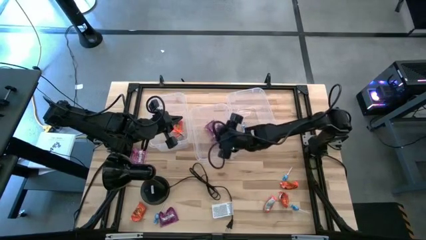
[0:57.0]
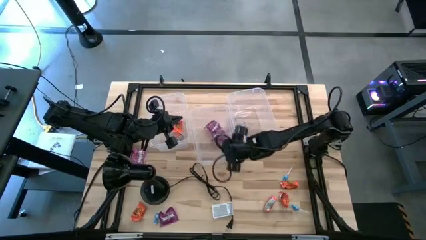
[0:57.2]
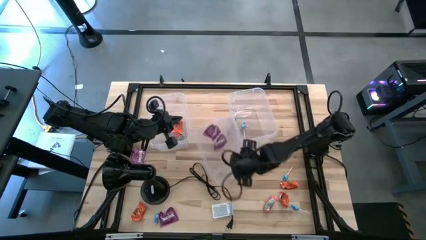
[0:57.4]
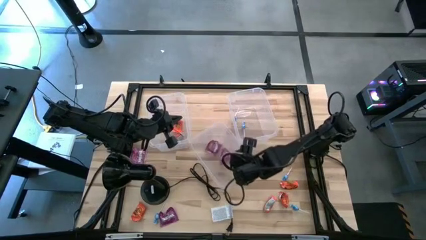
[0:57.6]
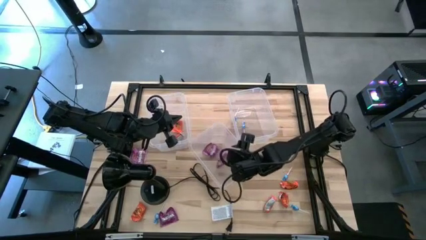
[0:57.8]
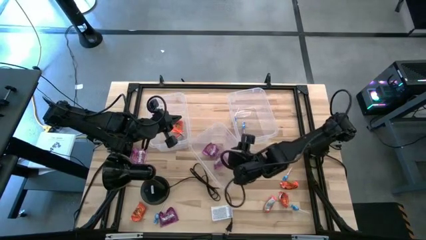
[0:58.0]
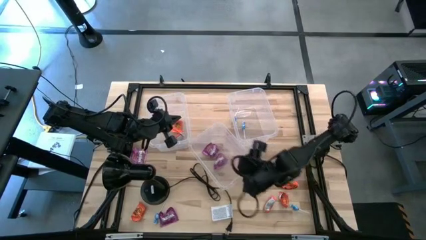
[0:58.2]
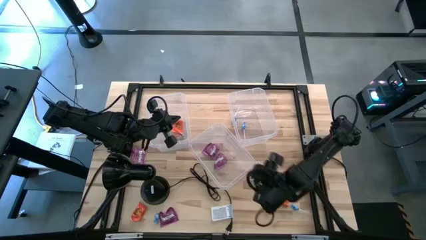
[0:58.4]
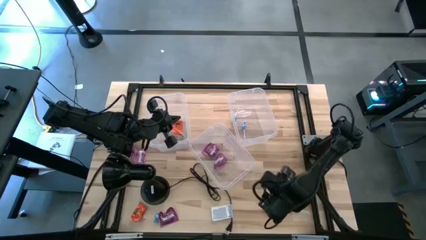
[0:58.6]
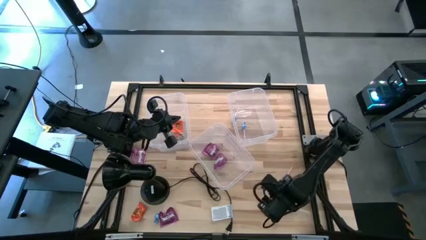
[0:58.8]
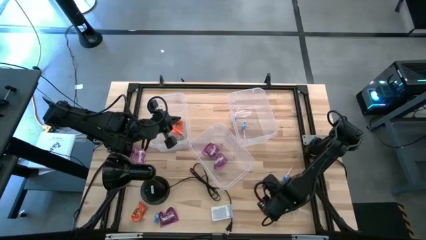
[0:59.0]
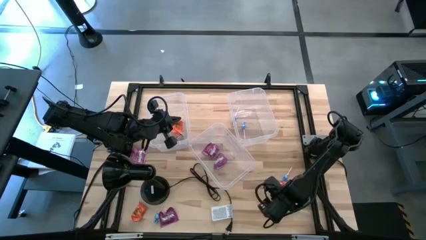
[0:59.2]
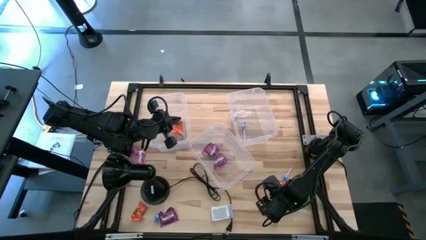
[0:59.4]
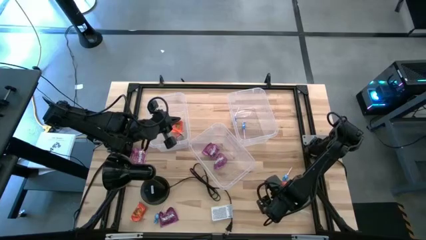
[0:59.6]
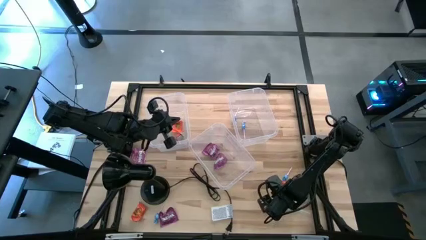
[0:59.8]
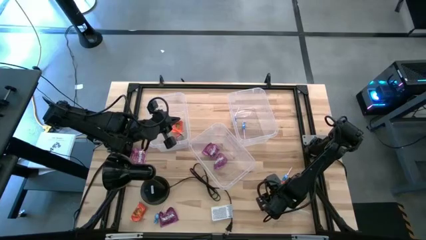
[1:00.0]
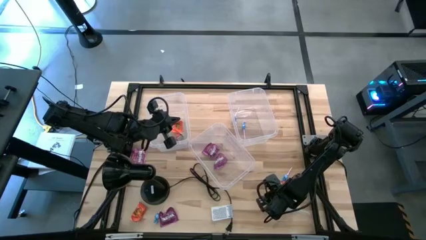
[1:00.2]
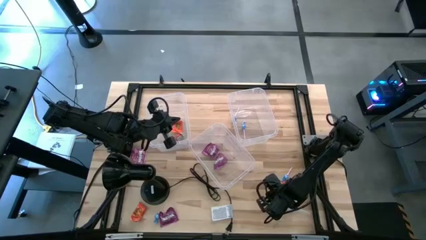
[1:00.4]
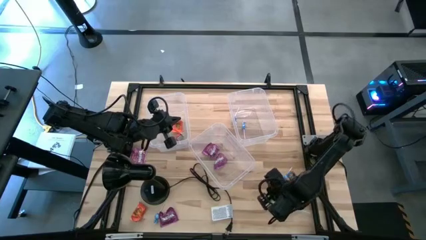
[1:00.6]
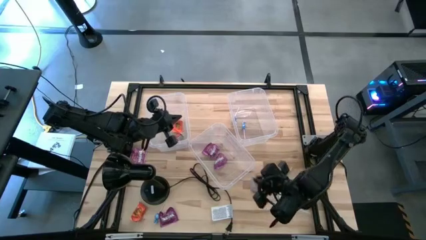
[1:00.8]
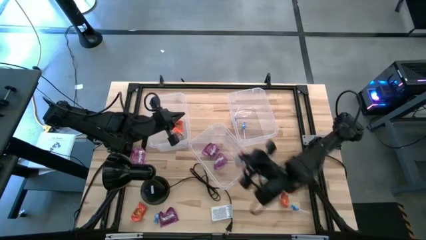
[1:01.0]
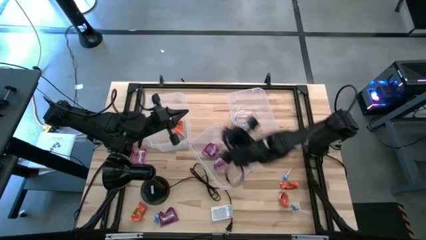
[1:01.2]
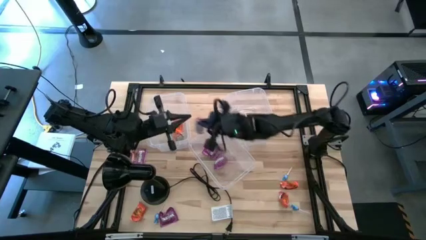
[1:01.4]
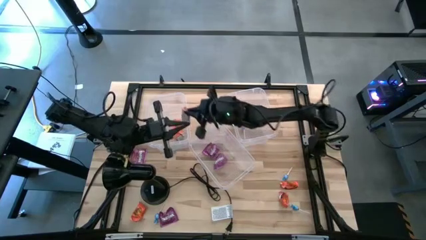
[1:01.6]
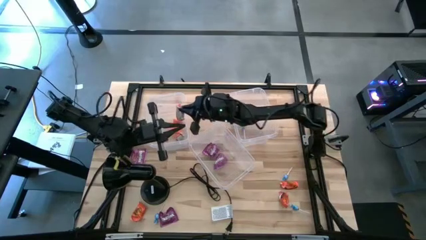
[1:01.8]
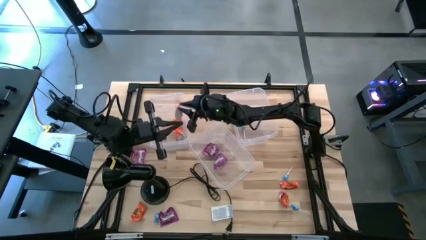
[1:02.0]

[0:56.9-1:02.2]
Task: Sort candy
Put the orange candy into the left transparent bin

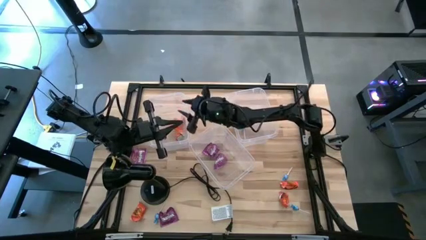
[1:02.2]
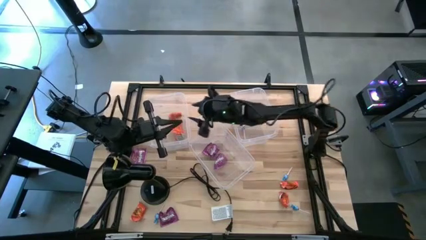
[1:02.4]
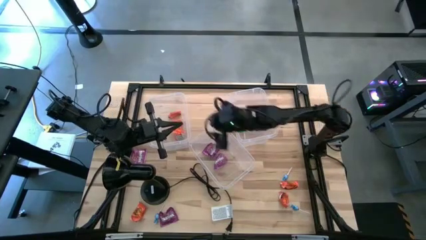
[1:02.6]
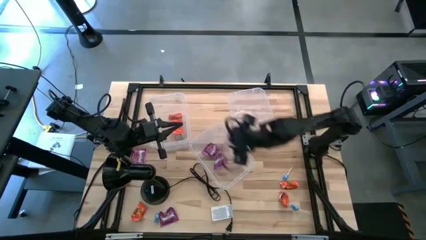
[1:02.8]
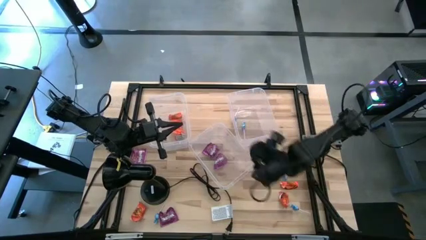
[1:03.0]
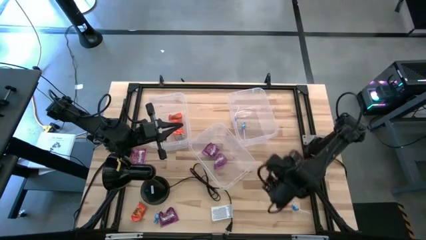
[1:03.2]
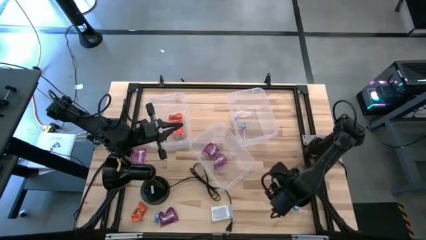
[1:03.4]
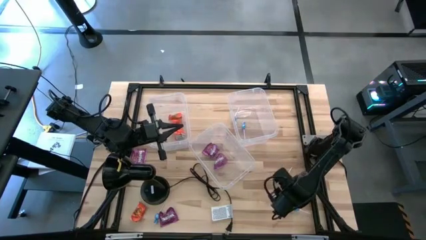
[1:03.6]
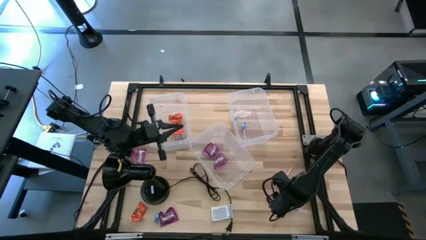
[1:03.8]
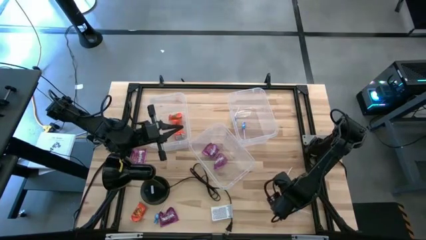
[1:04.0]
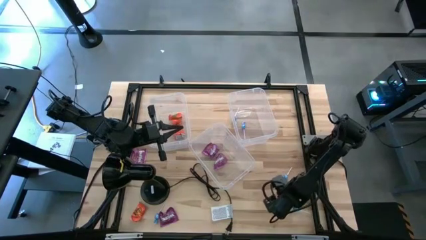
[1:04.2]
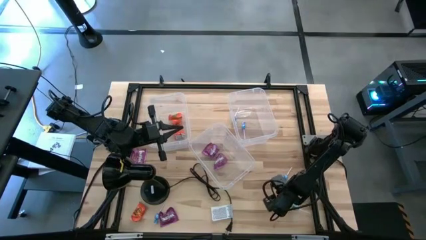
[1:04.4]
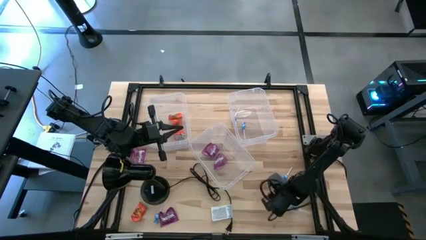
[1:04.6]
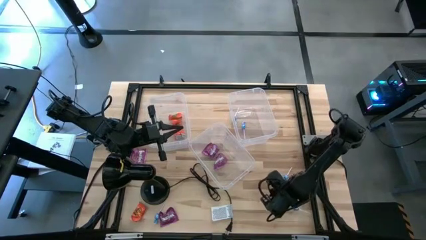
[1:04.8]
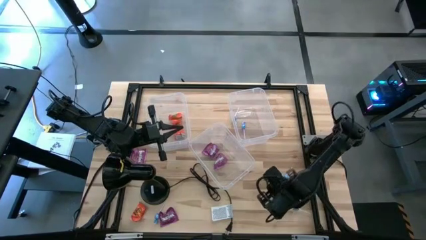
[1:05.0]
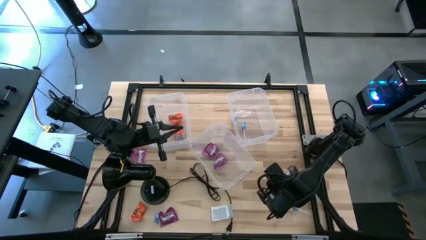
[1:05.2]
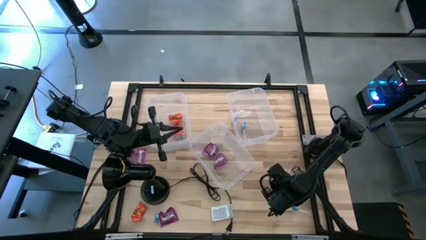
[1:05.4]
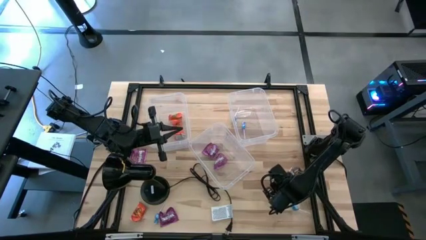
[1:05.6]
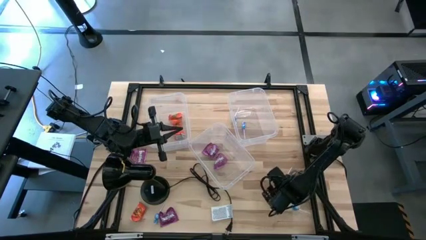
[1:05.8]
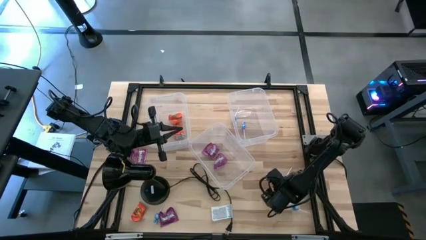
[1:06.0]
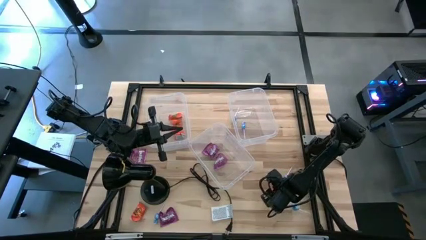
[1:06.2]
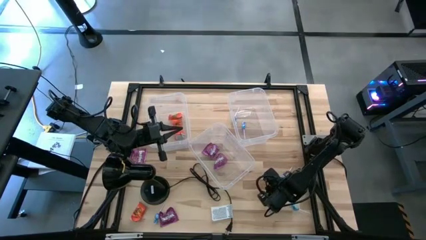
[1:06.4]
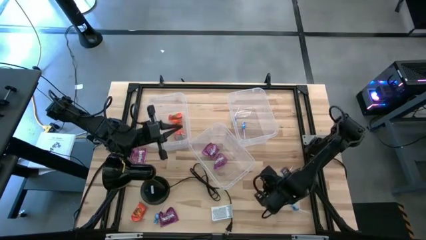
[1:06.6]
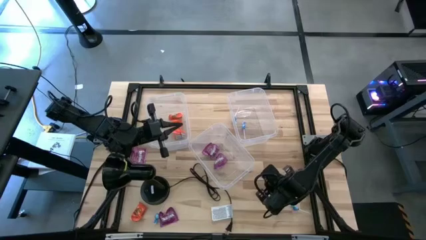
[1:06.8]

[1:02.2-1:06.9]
Put the orange candy into the left transparent bin

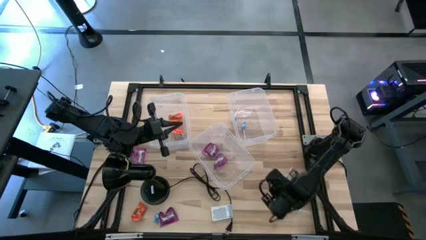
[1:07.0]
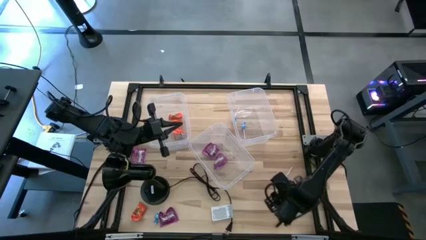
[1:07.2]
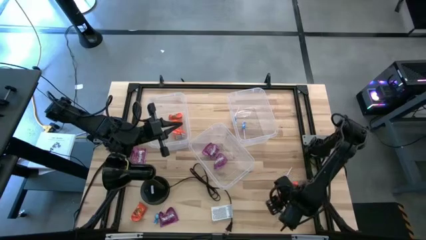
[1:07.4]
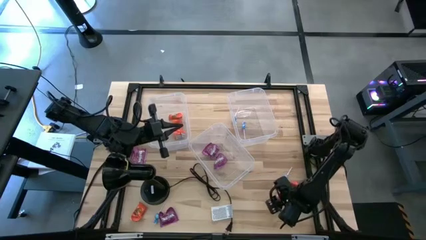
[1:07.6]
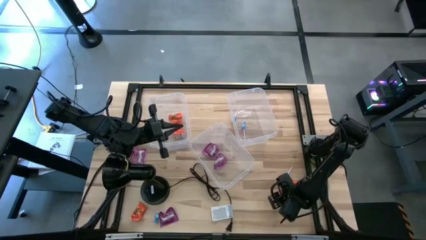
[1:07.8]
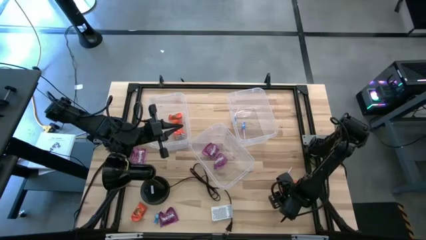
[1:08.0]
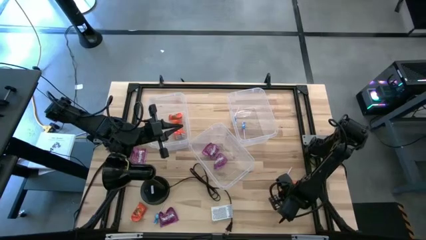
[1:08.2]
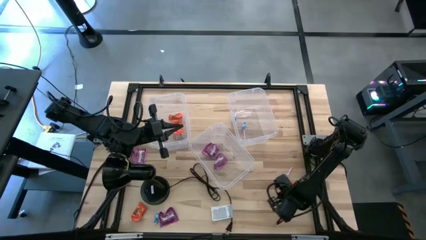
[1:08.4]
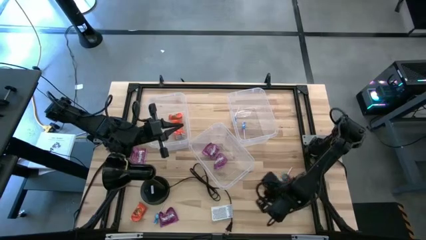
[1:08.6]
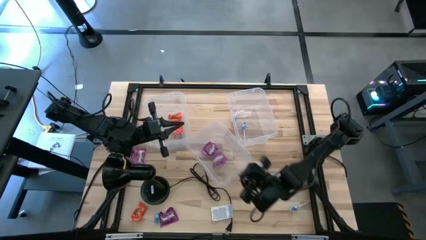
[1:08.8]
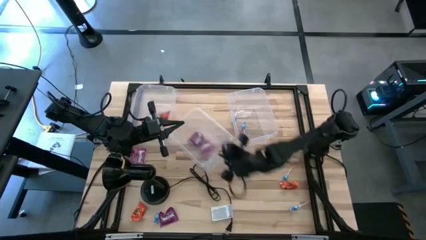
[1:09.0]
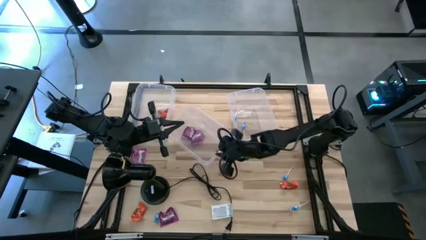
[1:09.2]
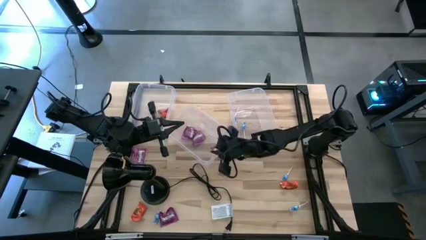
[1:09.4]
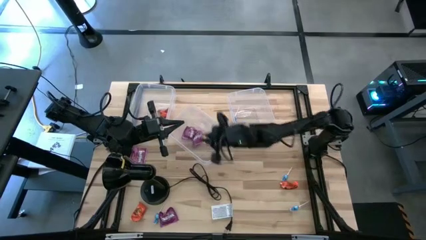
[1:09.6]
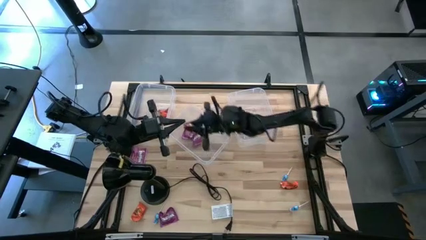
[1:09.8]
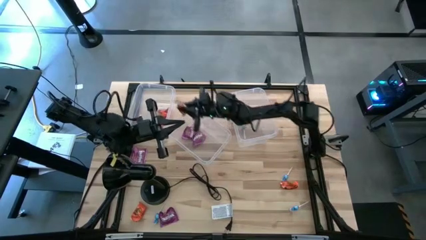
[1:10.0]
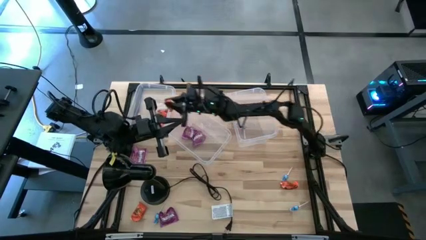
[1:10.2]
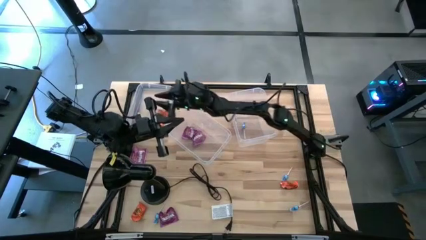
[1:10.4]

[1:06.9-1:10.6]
Put the orange candy into the left transparent bin

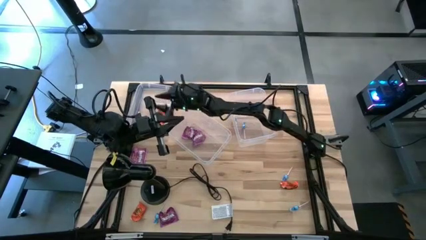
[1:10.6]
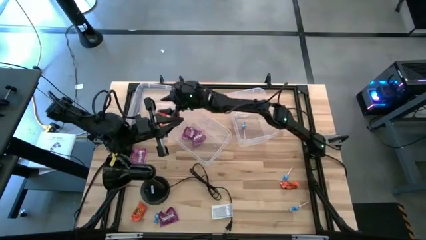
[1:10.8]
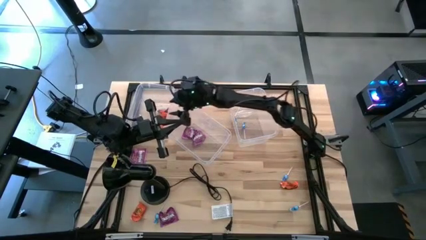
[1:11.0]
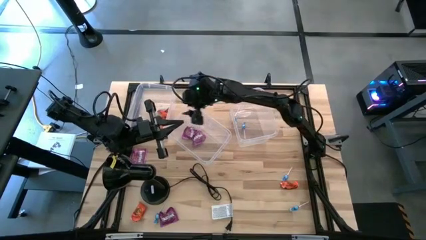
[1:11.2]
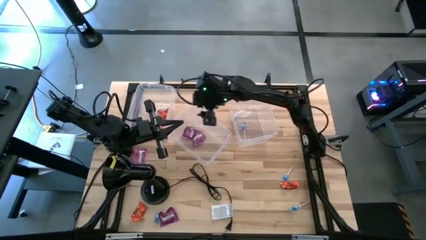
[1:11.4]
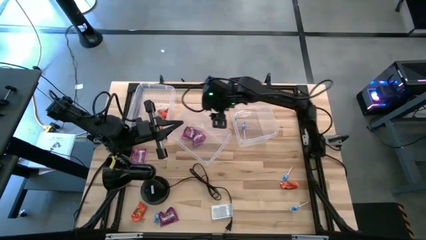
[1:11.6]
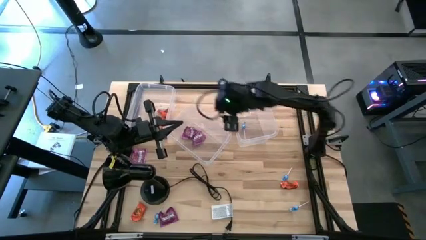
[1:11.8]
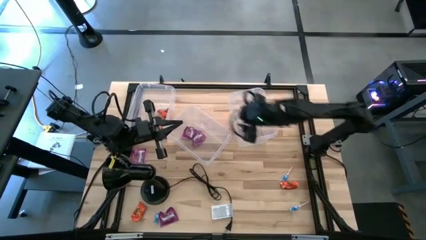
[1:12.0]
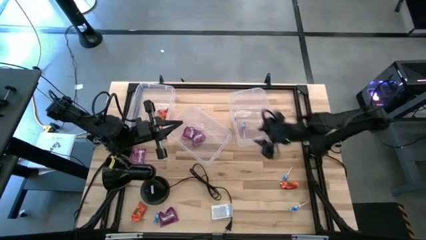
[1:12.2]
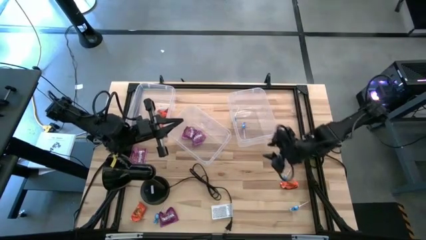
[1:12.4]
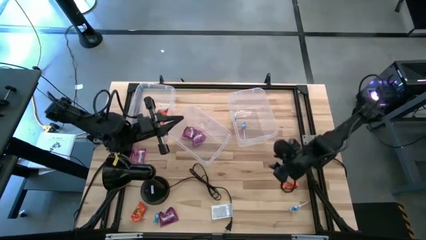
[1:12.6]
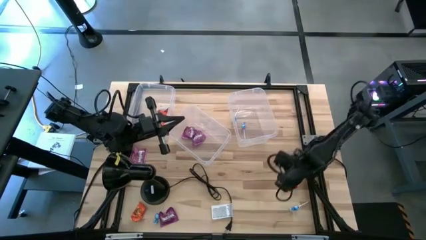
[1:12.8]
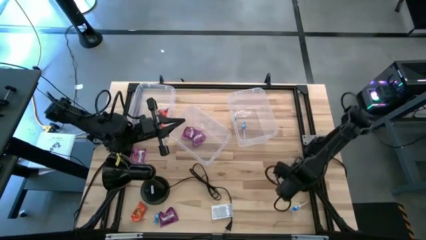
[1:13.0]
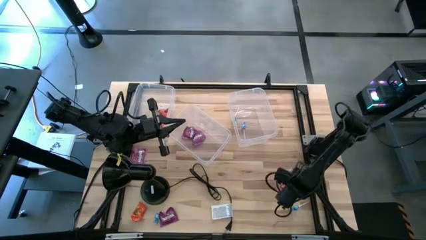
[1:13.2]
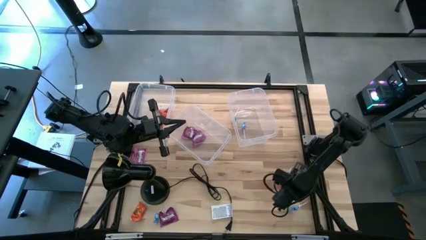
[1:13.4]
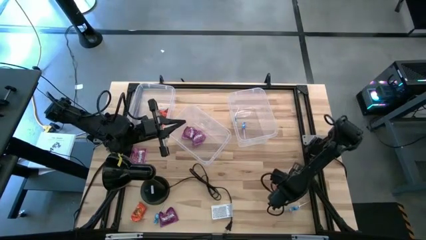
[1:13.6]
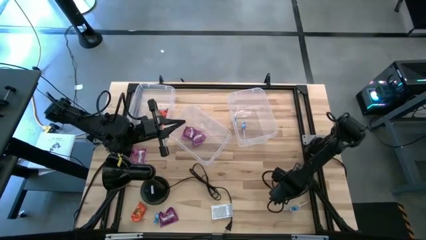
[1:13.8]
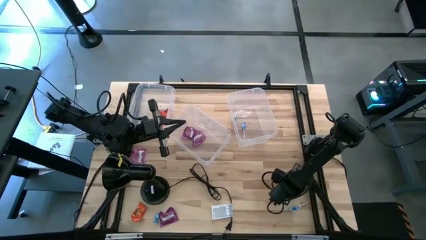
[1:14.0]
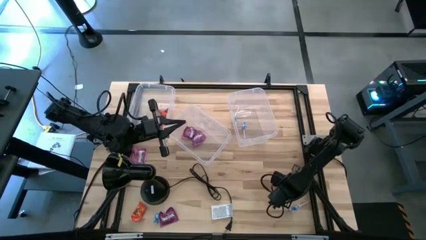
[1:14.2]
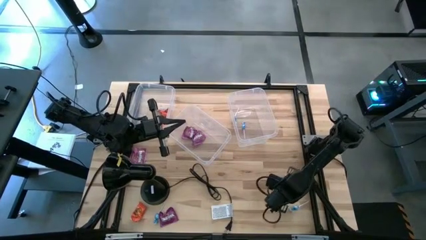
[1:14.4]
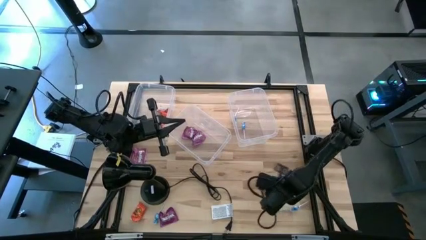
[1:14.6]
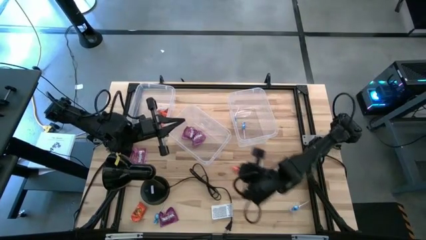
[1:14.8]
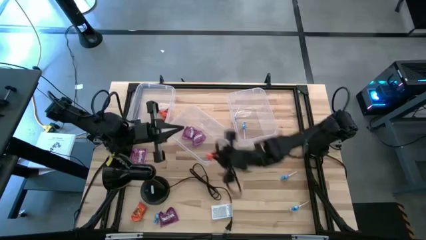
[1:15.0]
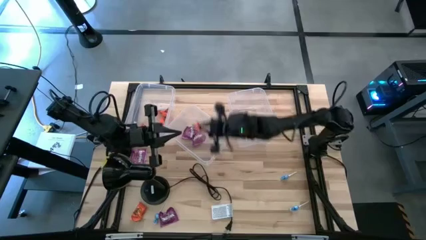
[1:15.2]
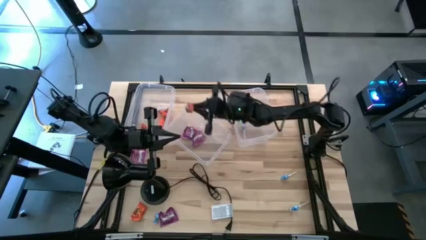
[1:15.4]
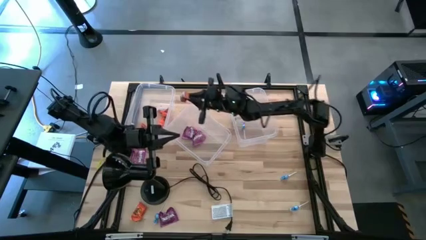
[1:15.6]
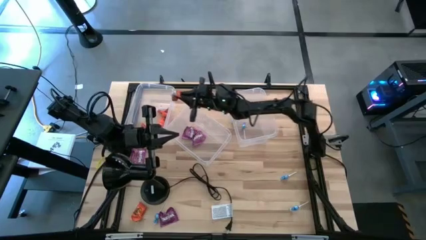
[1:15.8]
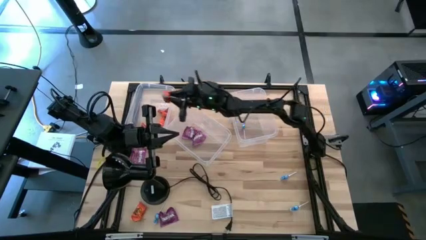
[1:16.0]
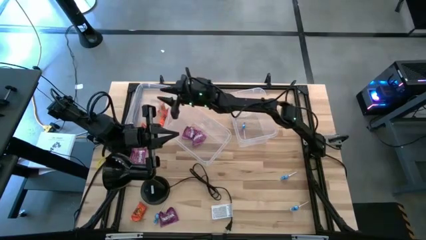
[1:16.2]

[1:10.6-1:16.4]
Put the orange candy into the left transparent bin
